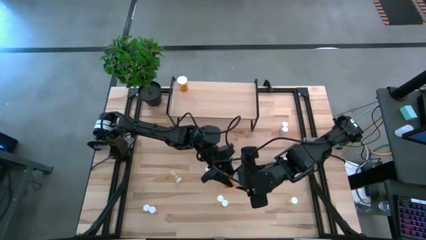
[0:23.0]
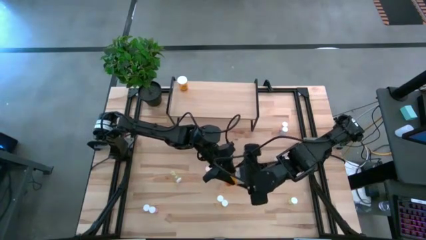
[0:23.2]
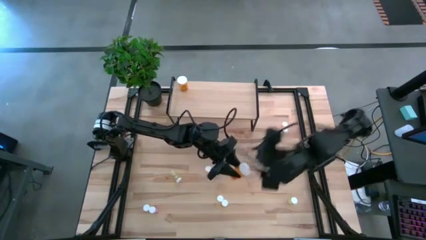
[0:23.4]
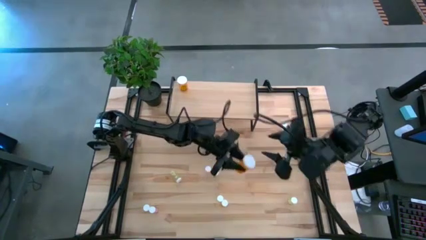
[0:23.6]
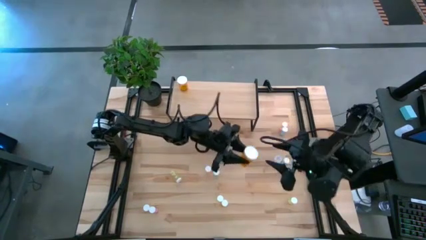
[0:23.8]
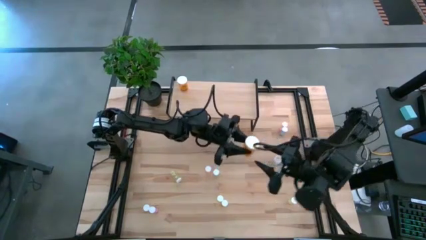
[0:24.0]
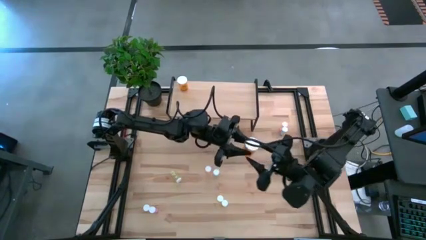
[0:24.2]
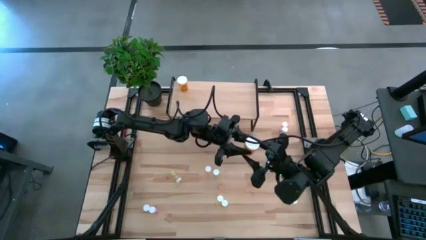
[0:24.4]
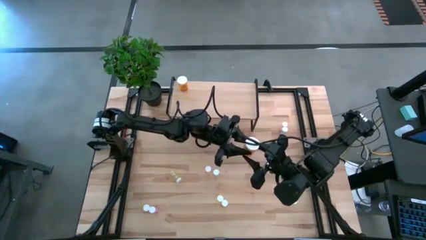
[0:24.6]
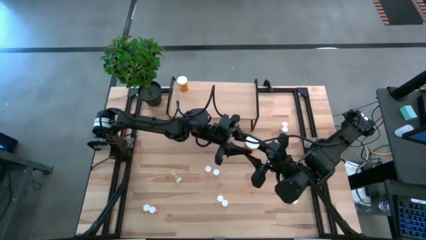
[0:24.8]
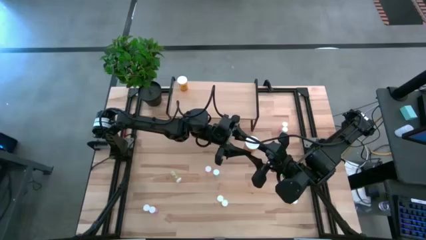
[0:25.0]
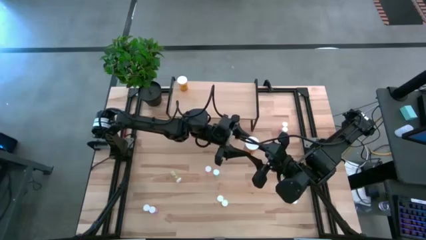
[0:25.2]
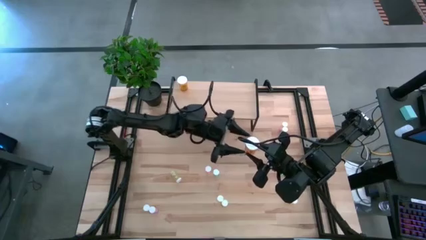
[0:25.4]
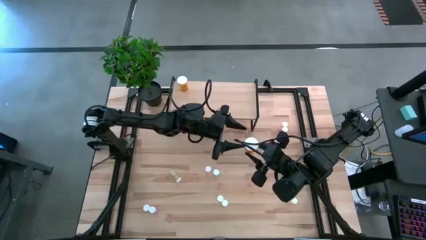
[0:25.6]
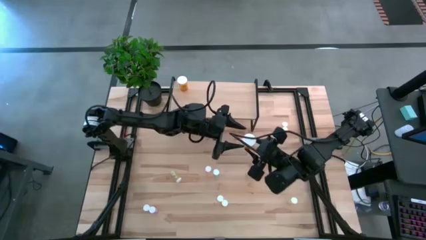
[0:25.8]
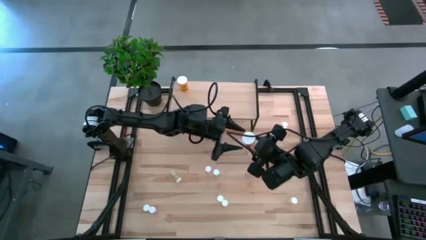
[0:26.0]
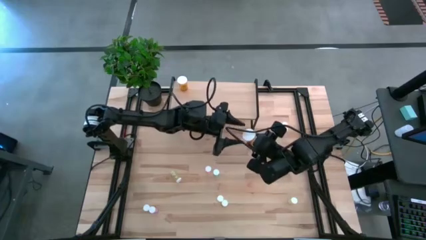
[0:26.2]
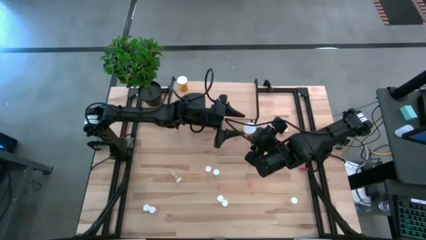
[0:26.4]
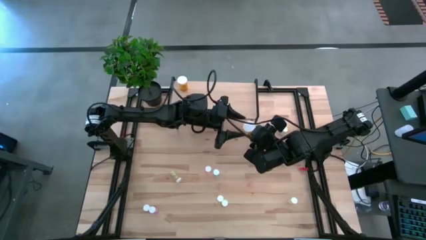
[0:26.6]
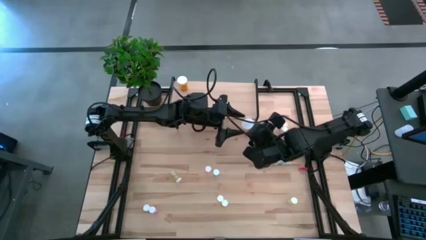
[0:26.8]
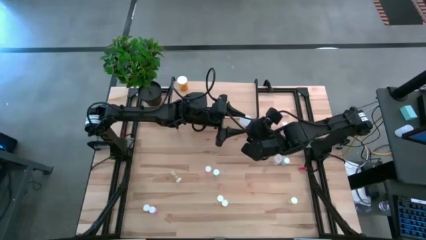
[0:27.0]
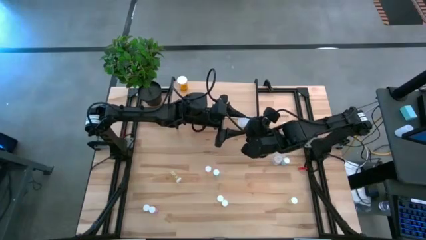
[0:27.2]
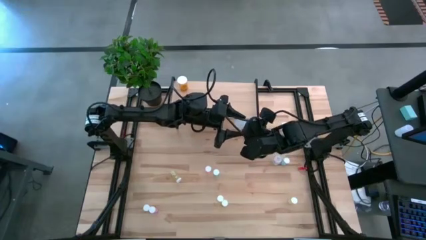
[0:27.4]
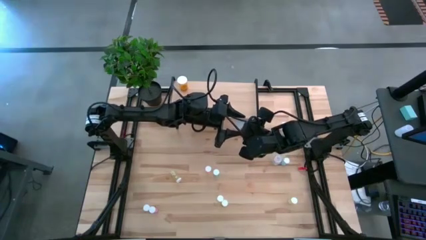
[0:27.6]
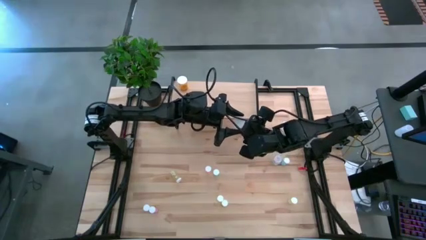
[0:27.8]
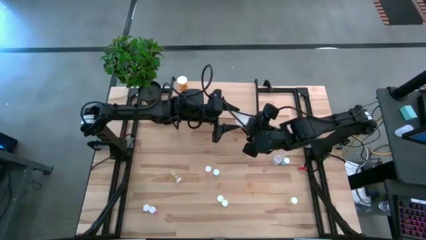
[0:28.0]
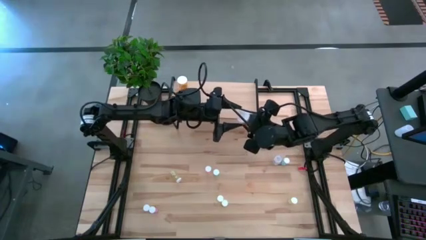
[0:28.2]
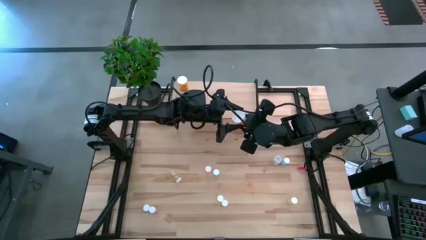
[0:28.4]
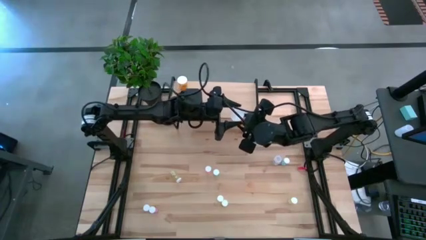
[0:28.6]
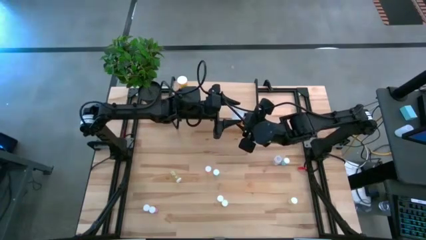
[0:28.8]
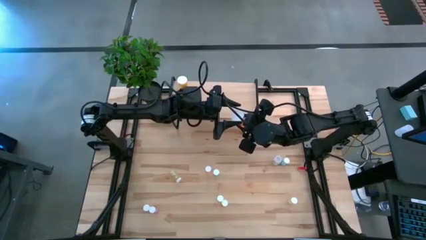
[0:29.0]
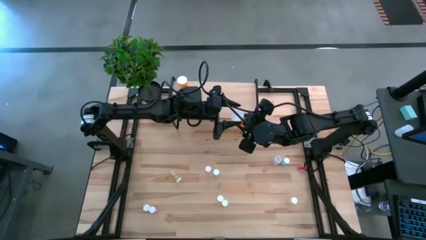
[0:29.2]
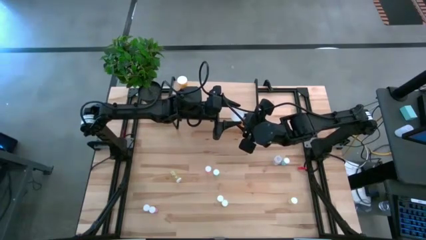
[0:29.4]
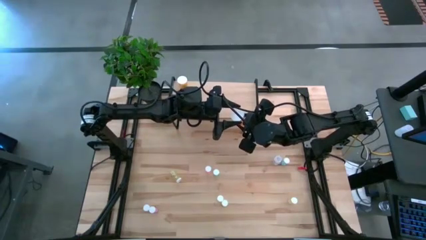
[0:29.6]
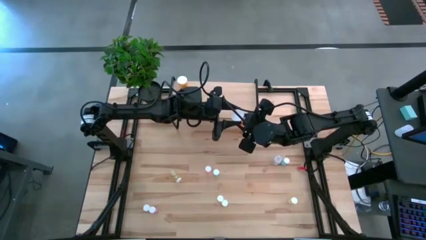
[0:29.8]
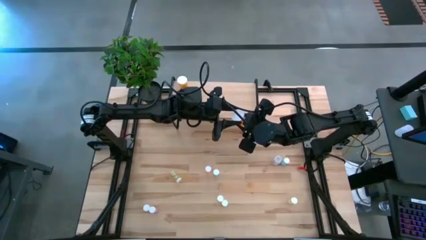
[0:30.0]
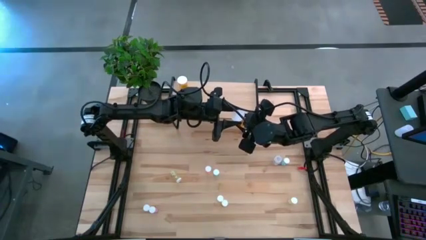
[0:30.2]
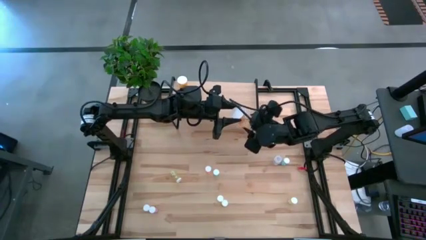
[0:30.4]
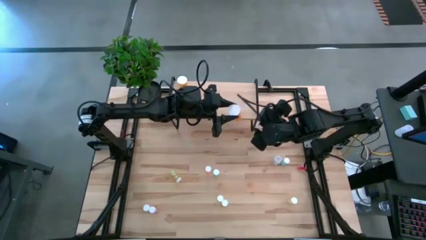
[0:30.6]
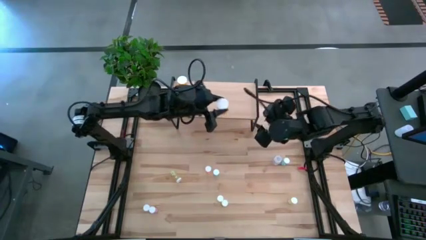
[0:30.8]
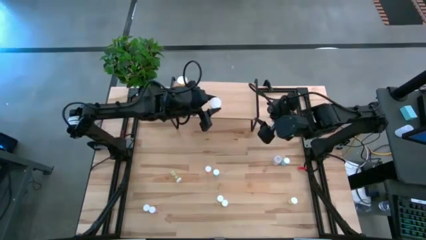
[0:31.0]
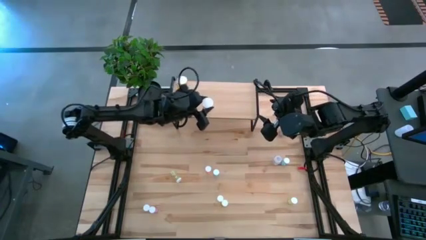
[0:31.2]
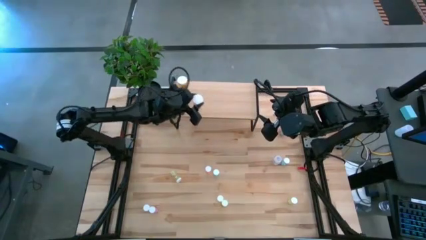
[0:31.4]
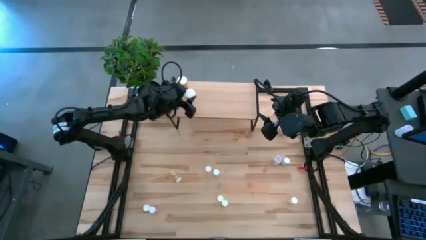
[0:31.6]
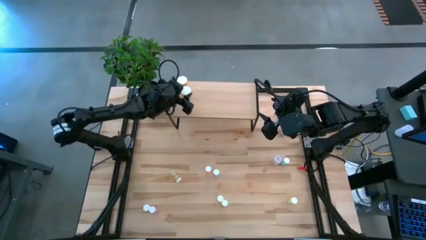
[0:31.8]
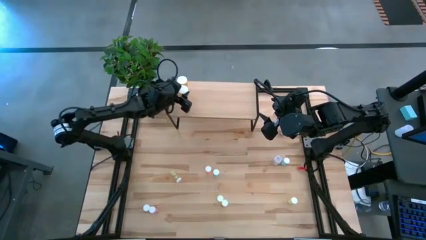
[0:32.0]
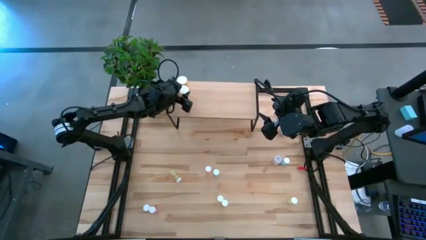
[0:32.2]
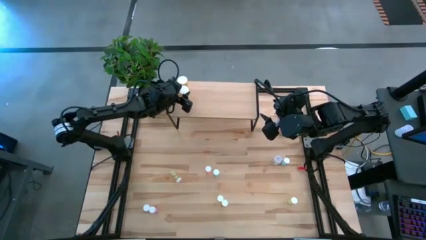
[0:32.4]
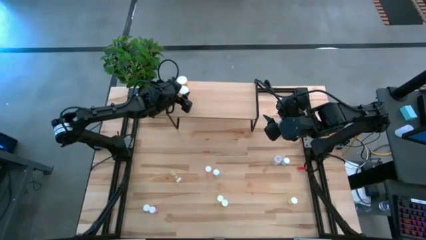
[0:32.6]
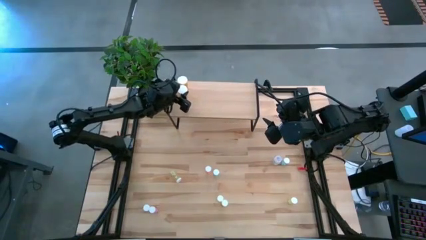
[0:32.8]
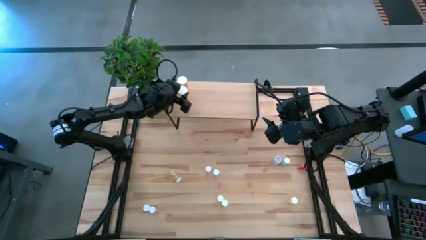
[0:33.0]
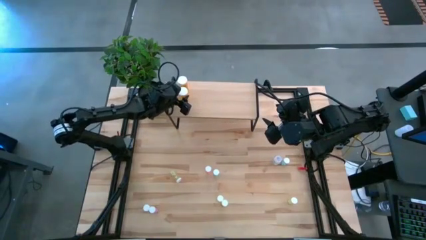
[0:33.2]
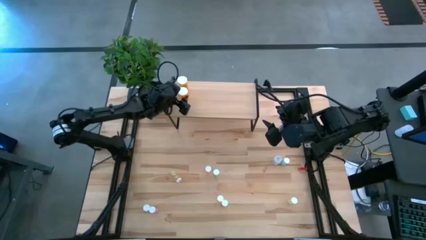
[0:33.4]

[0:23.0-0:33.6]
Task: Pick and place medicine bottles onto shelf by color
Put the orange pill bottle on the shelf

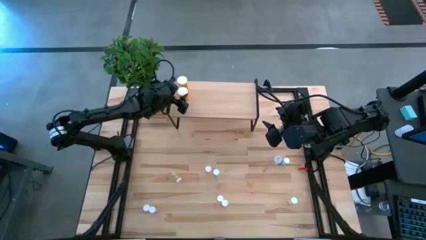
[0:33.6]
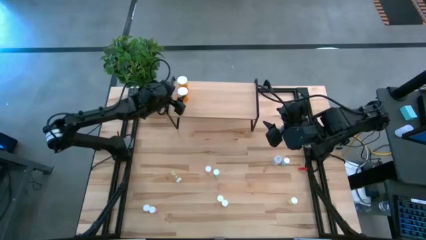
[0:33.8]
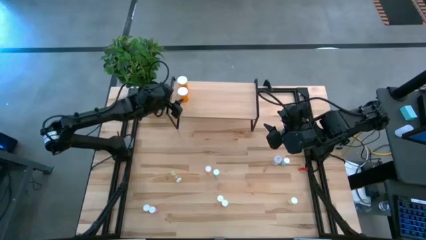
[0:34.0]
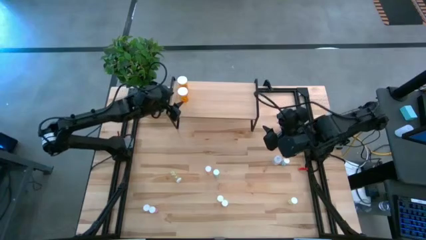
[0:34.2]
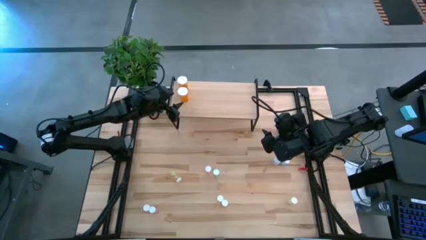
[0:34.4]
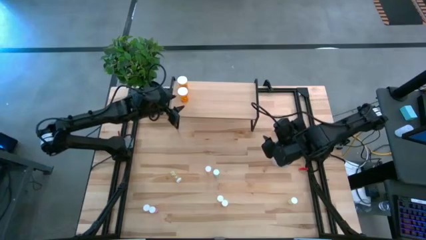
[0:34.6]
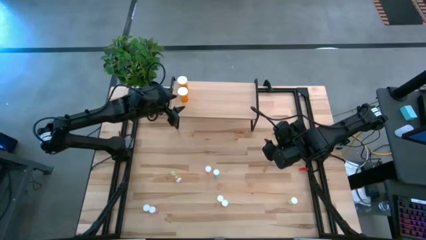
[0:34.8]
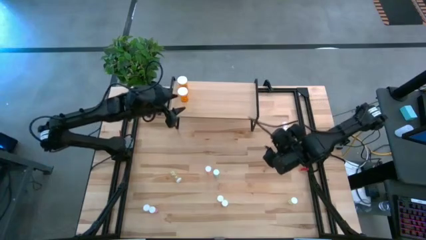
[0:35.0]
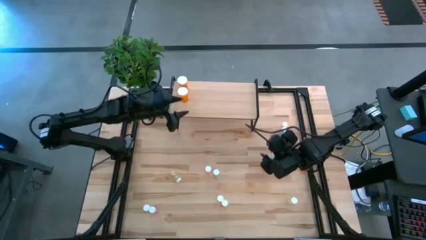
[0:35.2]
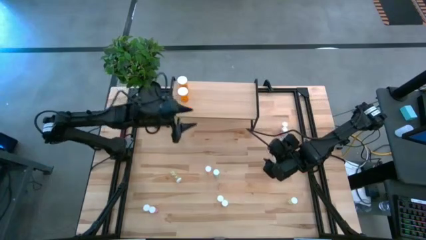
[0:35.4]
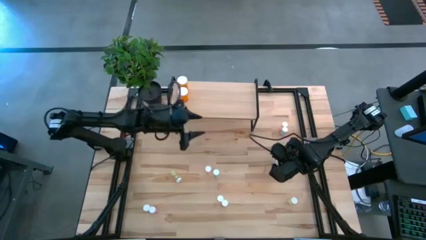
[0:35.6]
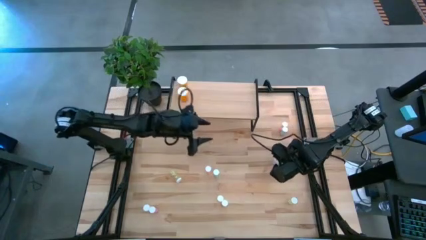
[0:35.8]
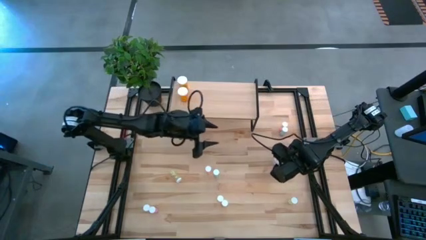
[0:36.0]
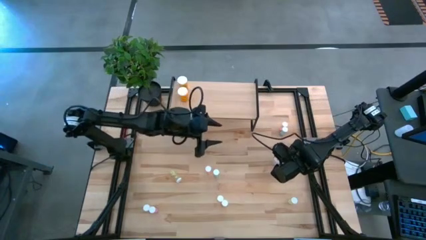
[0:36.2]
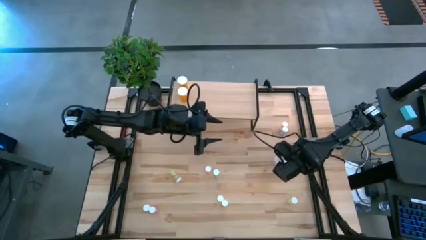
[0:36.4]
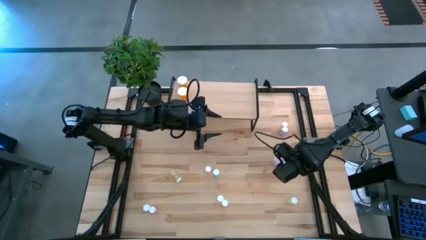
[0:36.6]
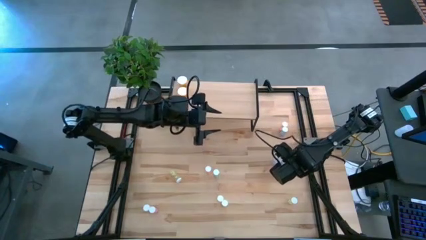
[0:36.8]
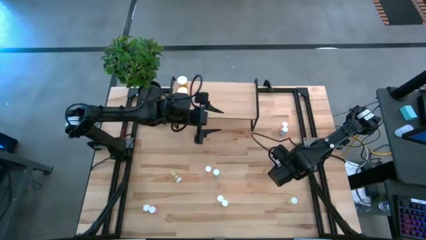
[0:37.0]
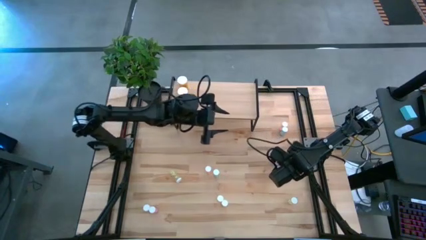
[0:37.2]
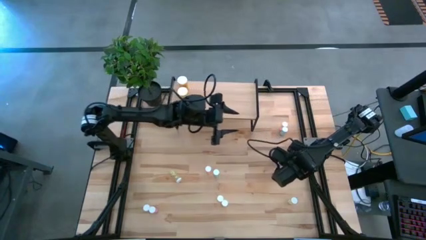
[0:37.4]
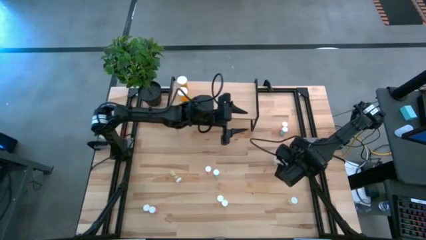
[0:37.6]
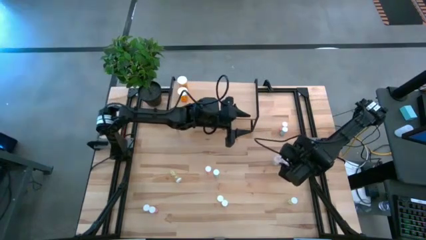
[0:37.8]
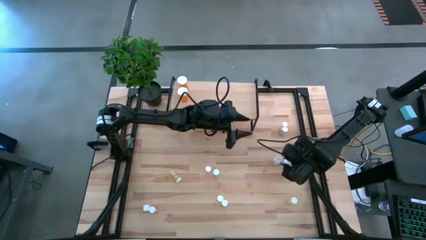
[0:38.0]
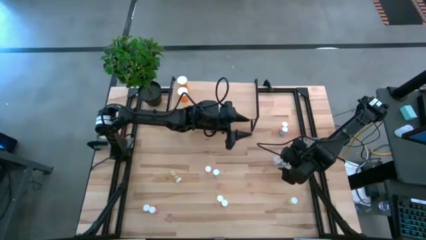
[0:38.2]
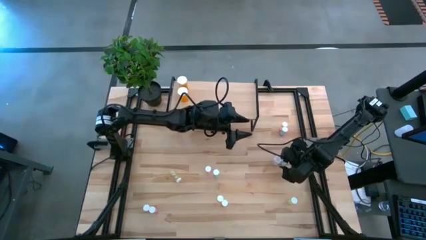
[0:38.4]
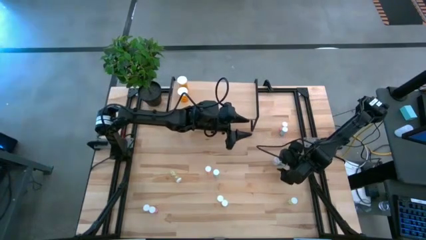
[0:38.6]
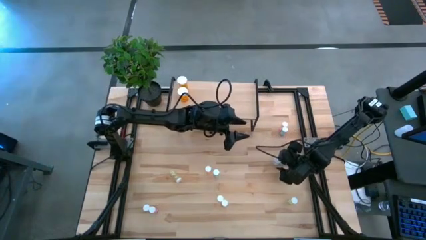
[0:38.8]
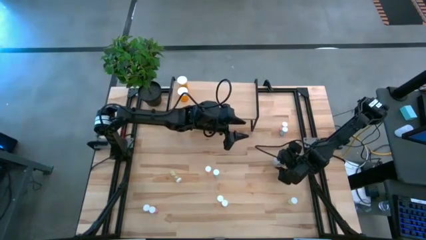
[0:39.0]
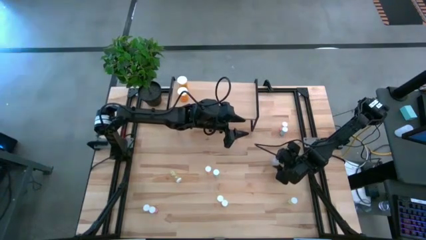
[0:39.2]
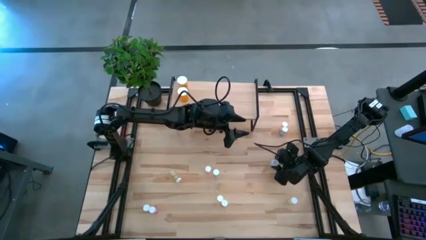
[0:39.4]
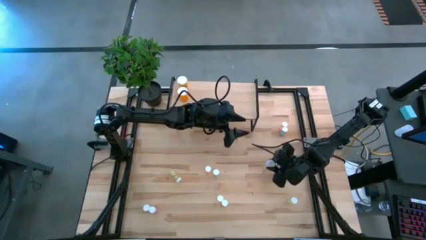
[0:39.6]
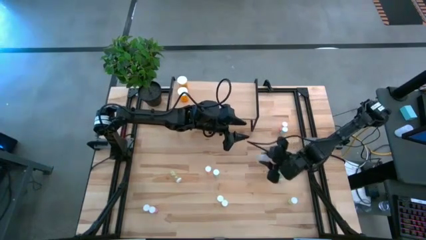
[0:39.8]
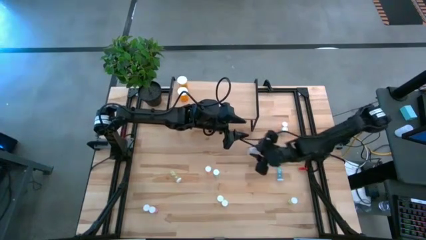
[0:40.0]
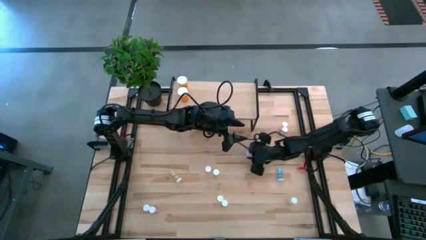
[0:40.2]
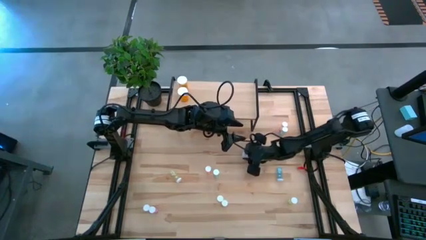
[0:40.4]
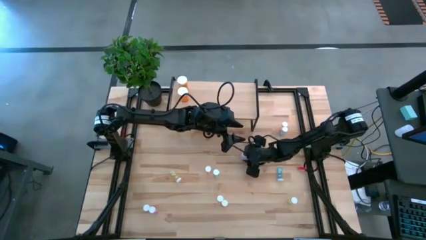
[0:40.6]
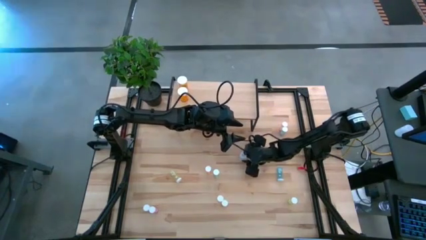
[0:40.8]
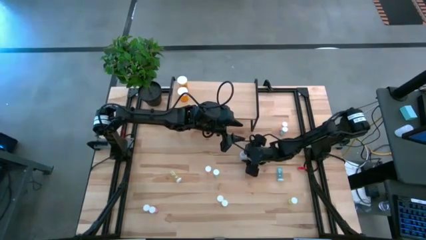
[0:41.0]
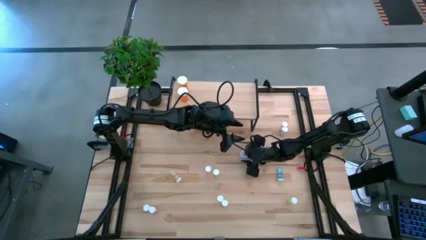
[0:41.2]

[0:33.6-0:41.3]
Put the transparent pill bottle on the shelf
